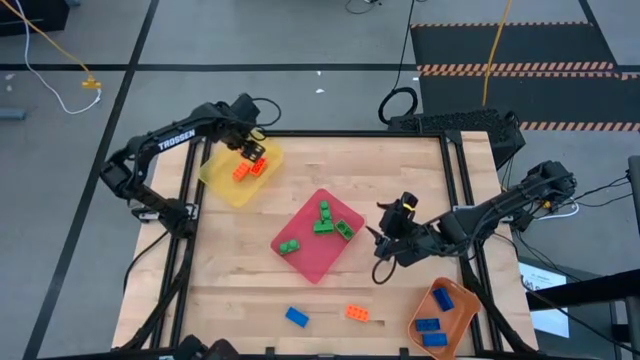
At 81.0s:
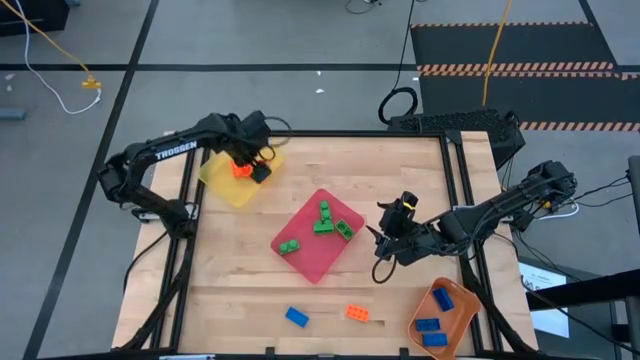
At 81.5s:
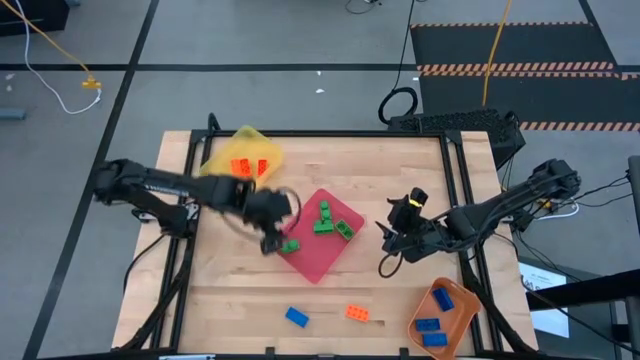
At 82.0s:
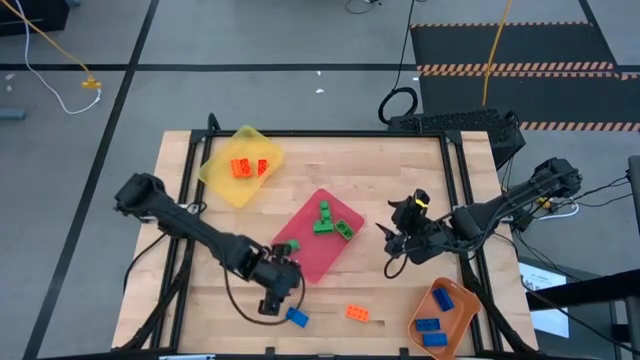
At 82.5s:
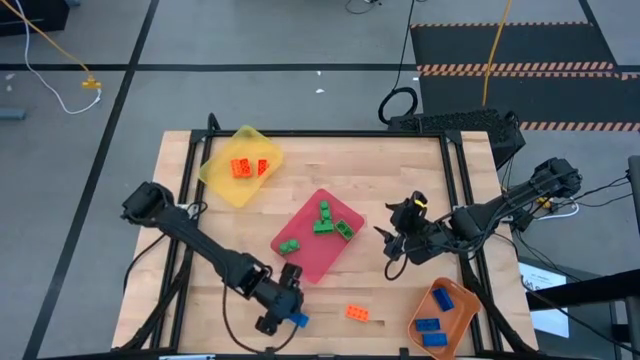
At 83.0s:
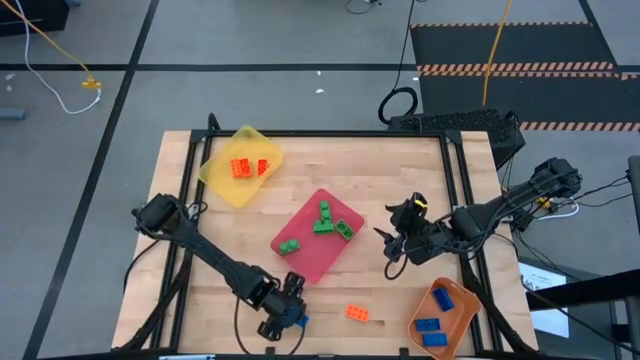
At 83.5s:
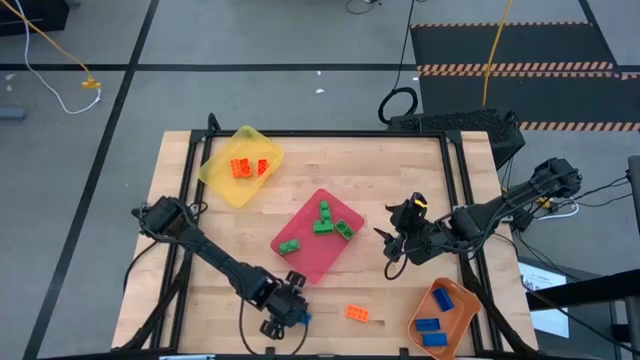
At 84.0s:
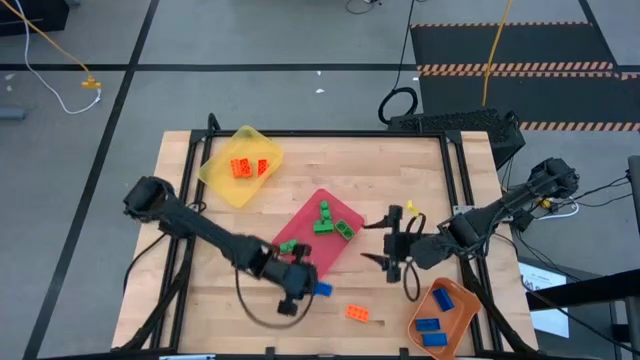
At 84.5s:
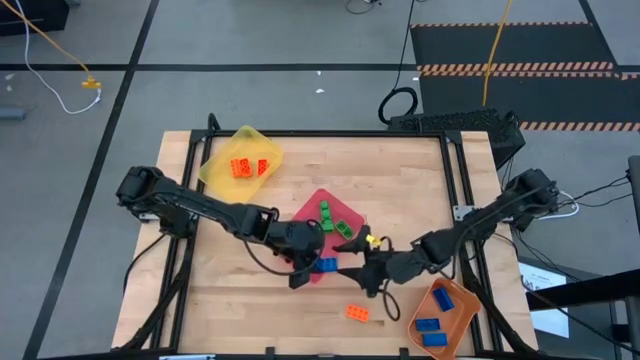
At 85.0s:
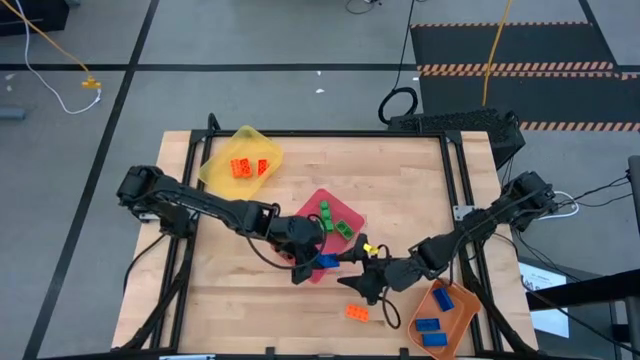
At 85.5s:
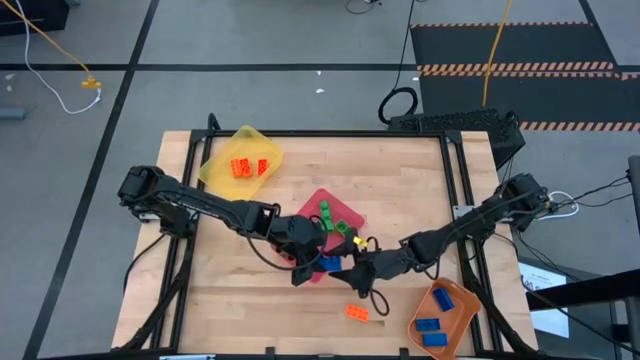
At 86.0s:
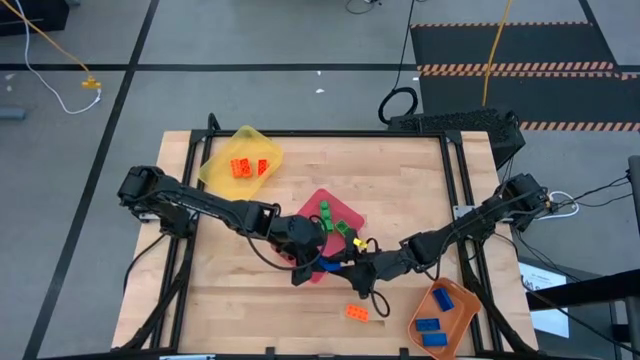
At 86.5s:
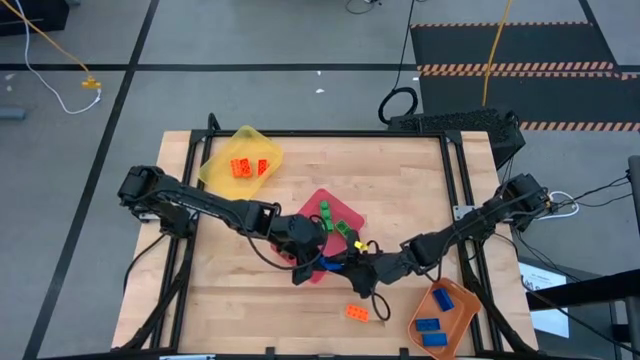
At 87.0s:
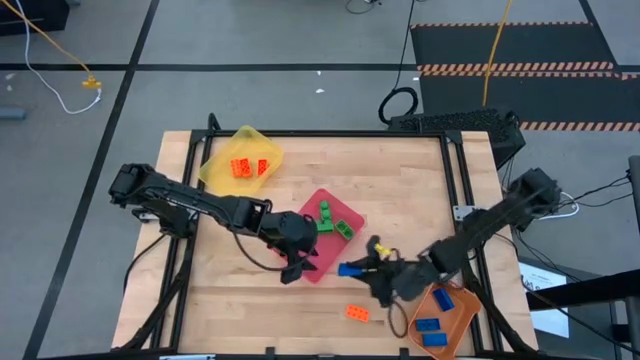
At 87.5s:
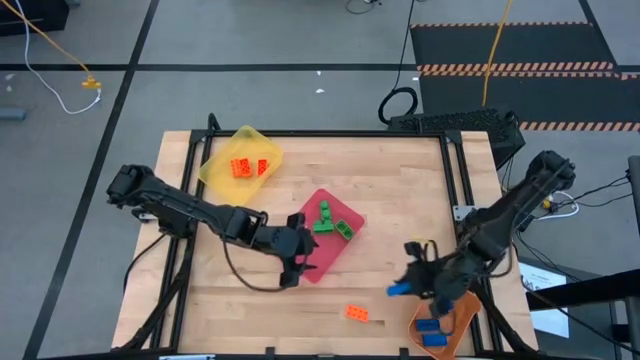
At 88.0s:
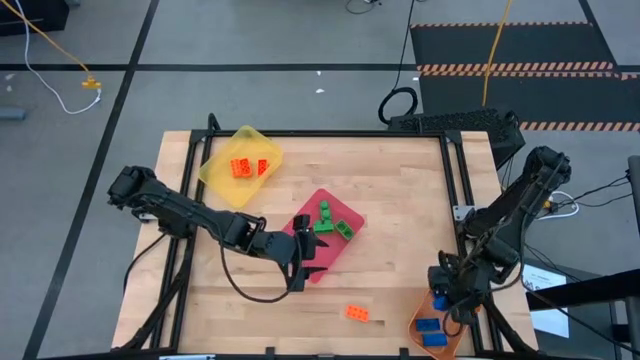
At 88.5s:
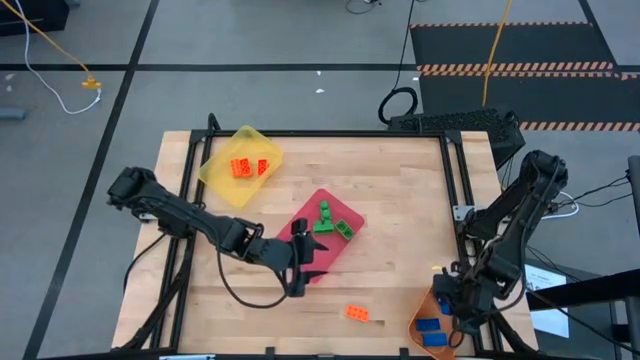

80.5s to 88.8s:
Task: Sort & place blocks by color
Put the blue game piece into the orange bin

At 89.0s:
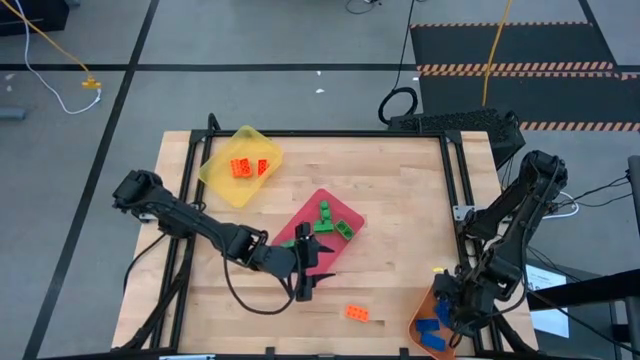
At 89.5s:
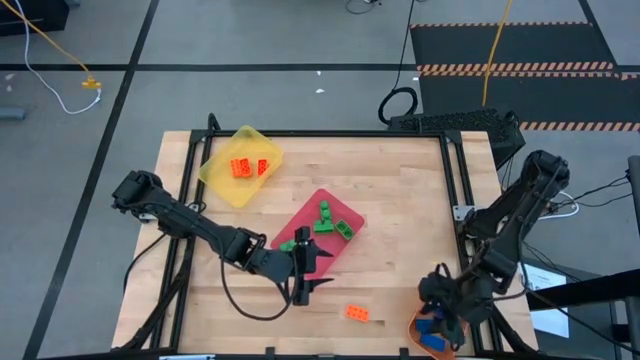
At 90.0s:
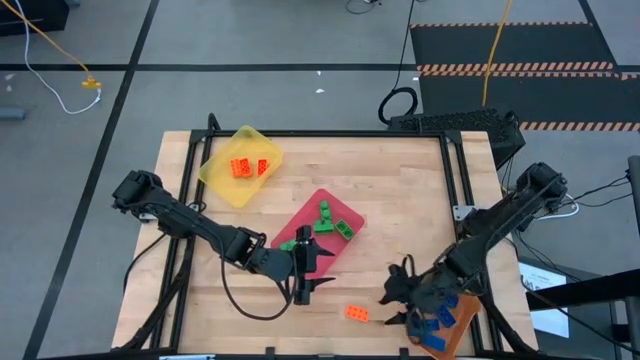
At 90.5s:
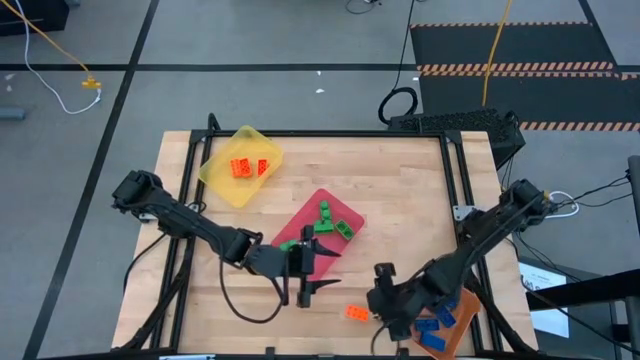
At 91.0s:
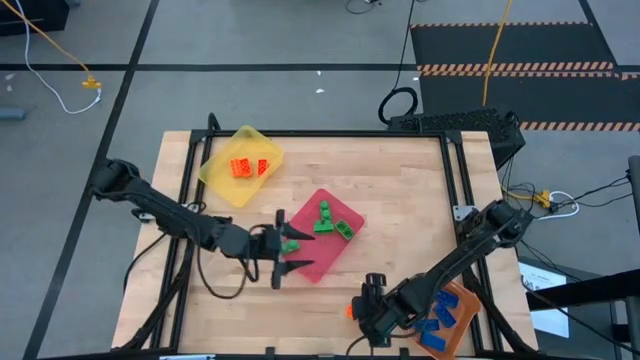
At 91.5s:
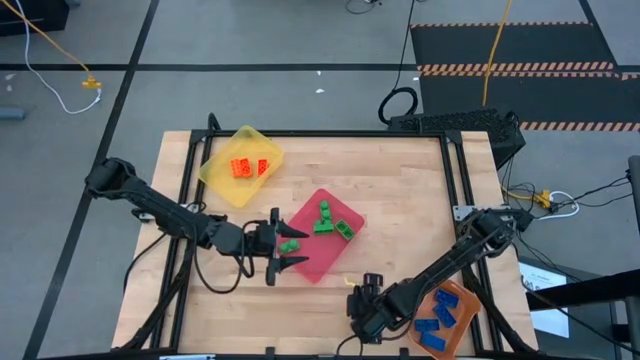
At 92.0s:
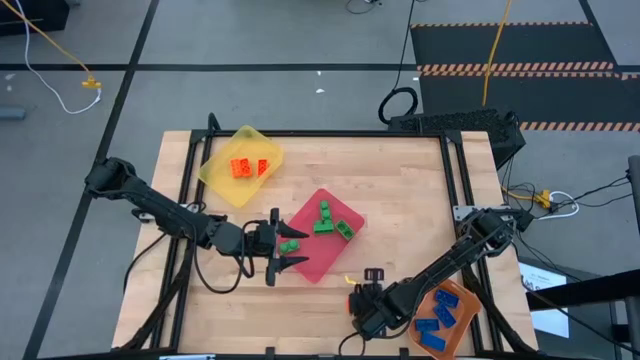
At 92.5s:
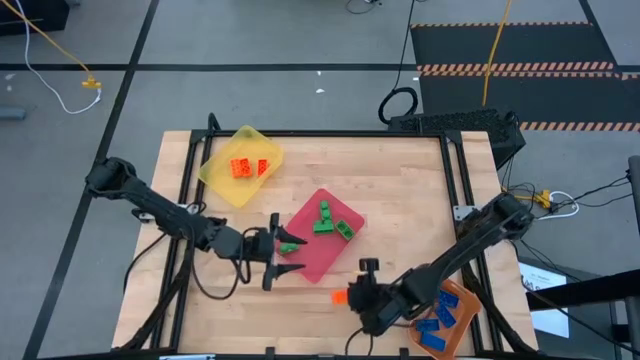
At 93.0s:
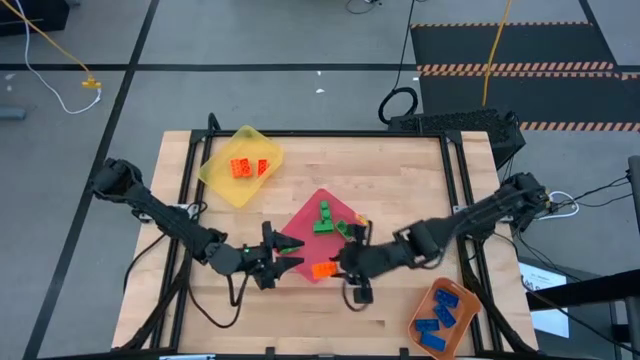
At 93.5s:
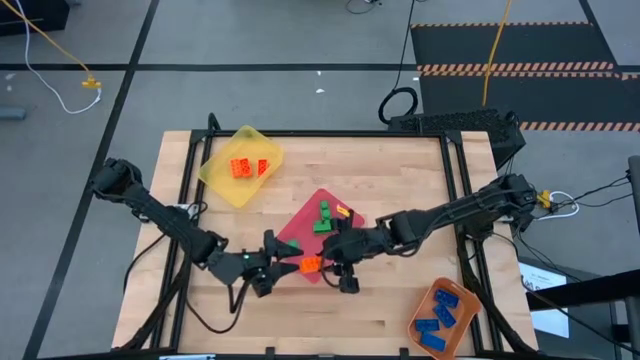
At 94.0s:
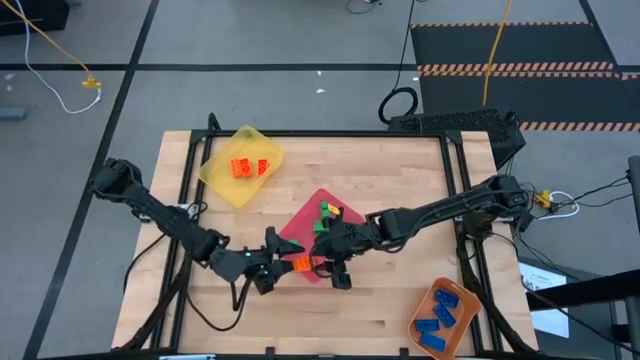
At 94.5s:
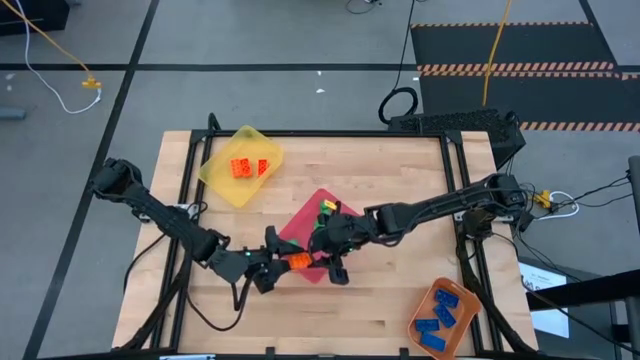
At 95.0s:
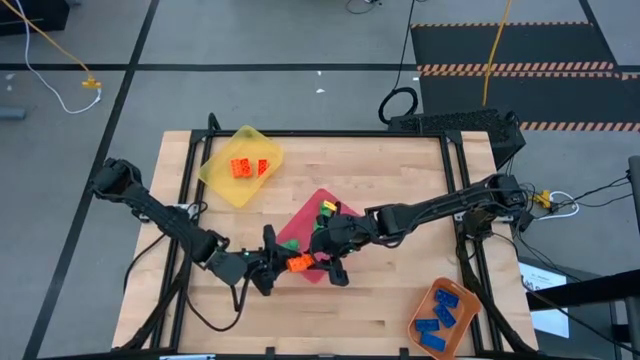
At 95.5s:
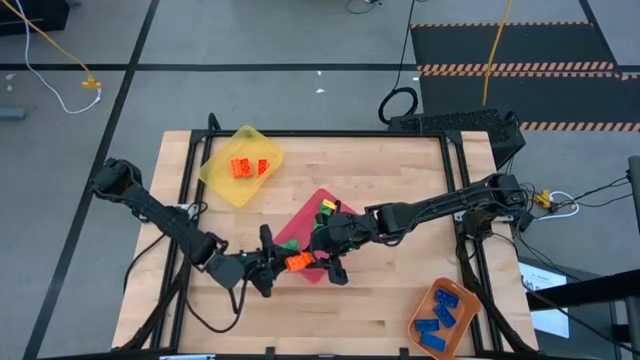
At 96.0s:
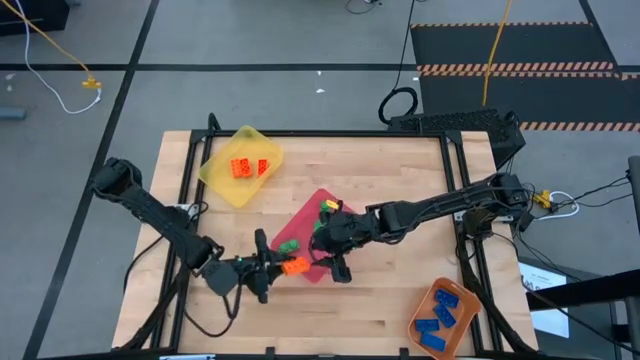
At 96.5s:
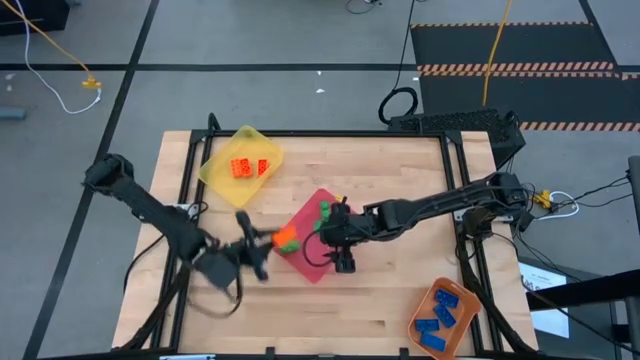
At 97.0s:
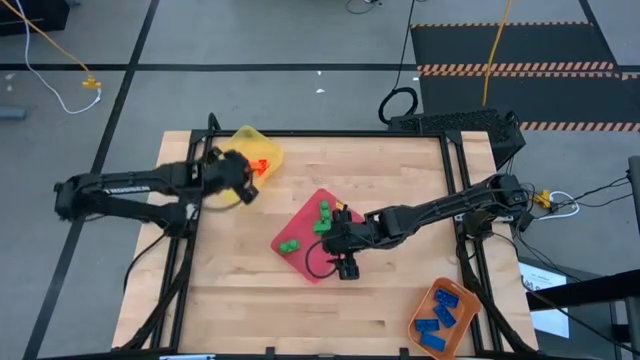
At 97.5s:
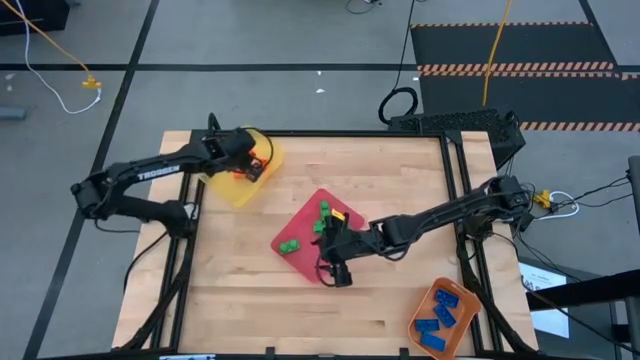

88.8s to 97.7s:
Put the orange game piece into the yellow bin

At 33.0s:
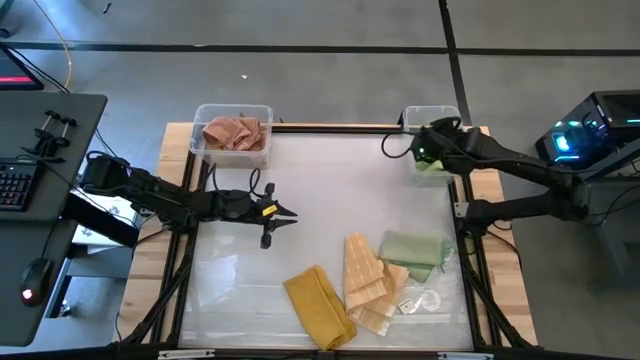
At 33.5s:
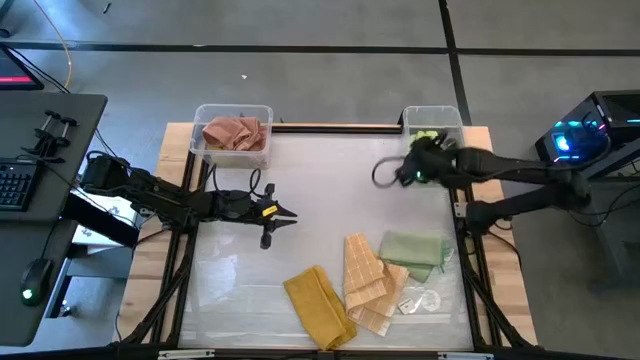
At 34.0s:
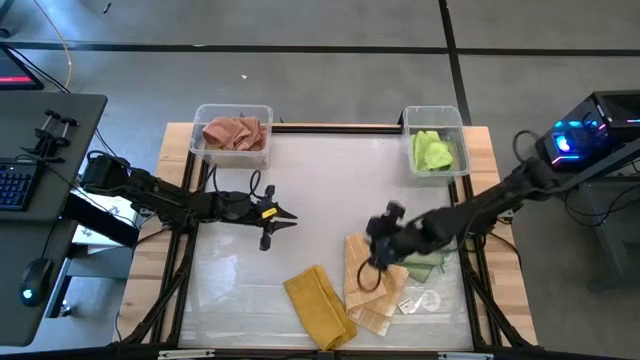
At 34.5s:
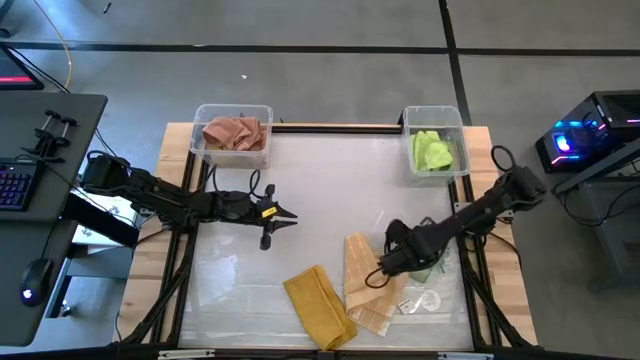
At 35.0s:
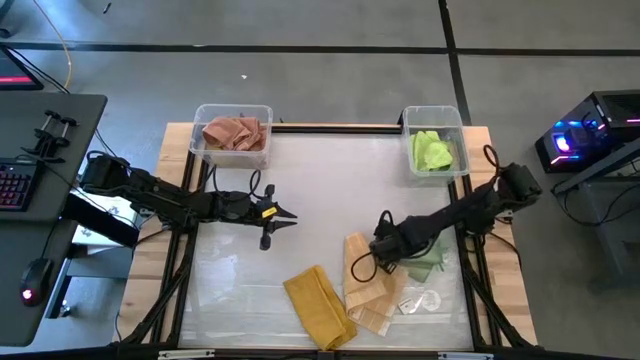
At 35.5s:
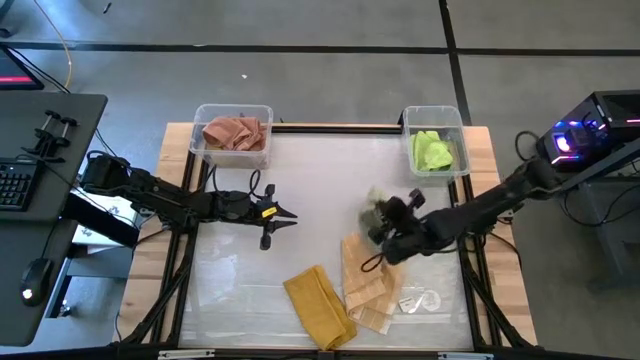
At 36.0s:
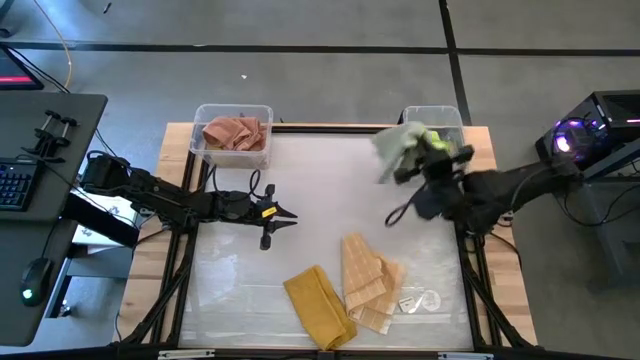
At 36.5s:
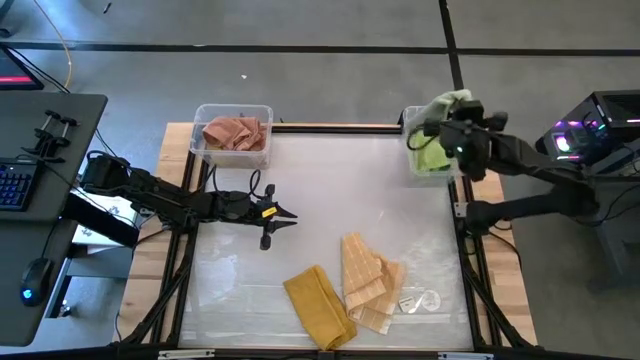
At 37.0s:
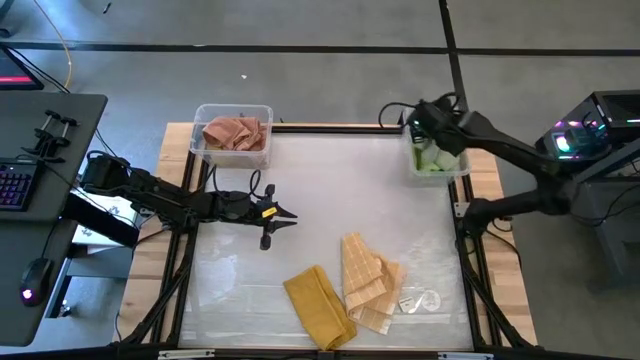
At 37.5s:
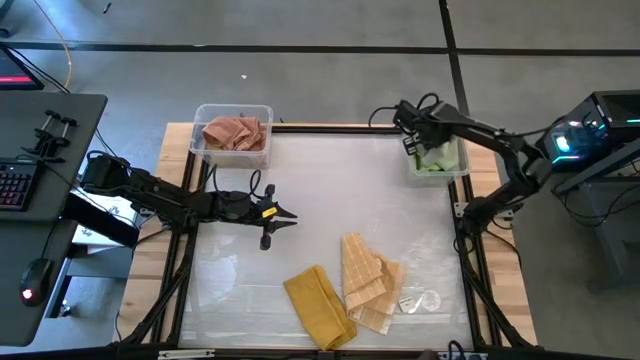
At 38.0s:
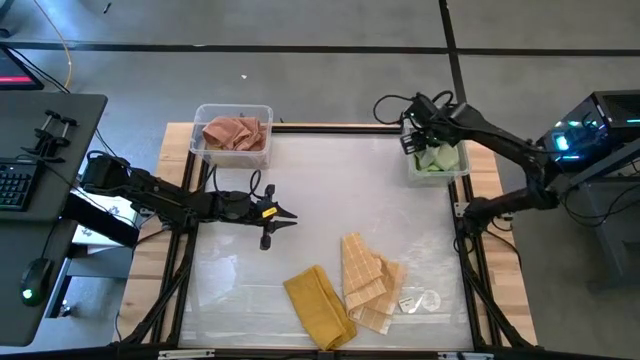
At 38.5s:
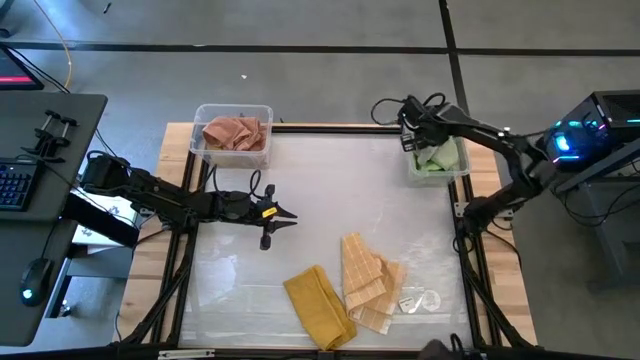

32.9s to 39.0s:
Task: Sort towels by color in basket
Put the light green microfiber cloth into the right transparent bin
